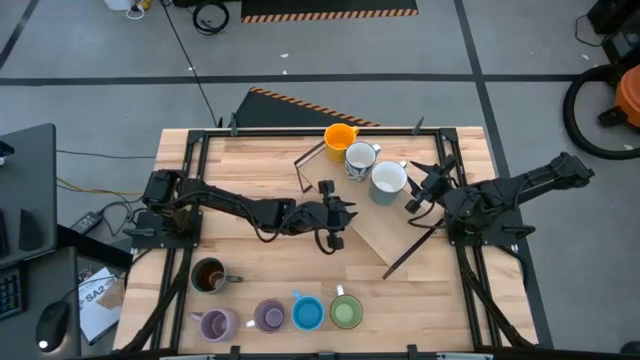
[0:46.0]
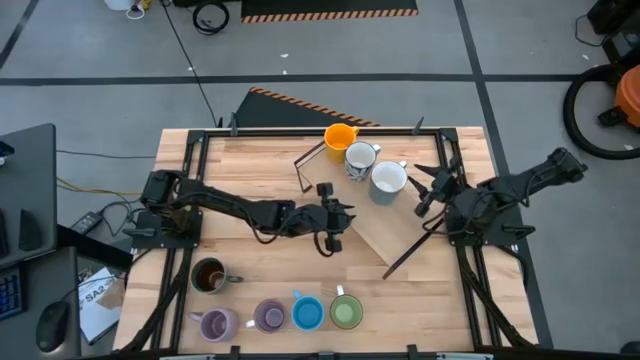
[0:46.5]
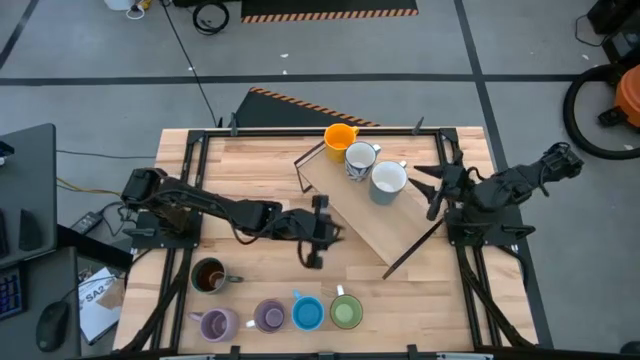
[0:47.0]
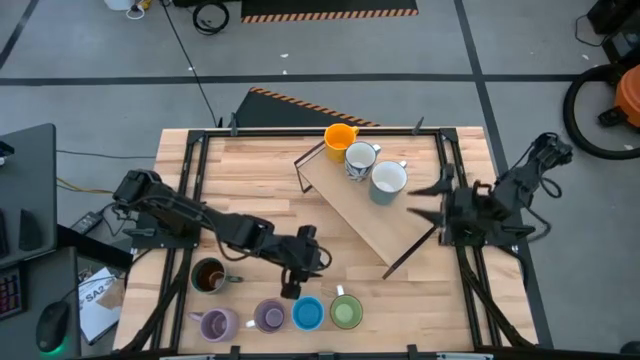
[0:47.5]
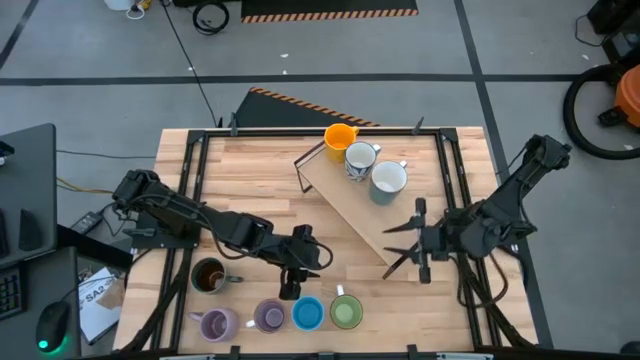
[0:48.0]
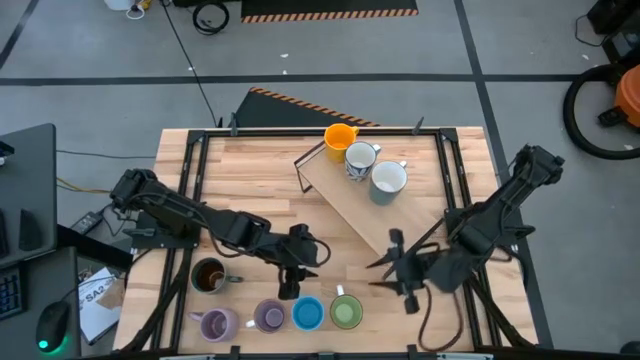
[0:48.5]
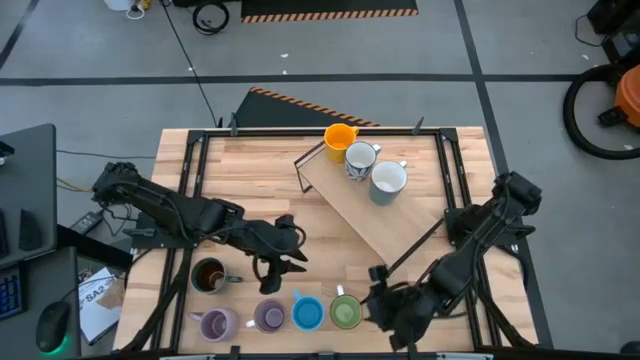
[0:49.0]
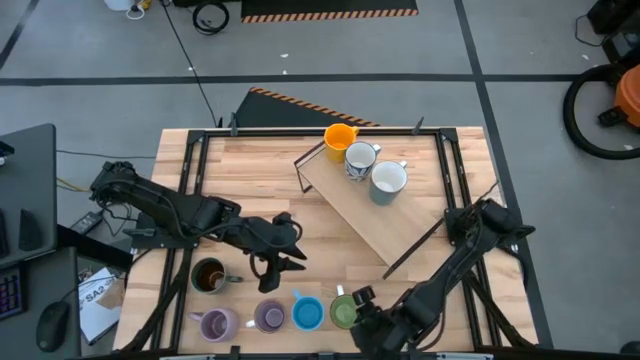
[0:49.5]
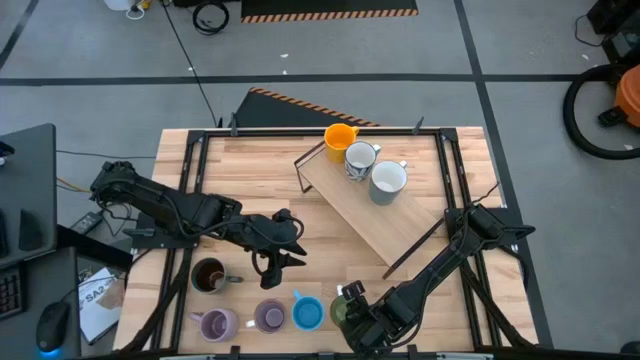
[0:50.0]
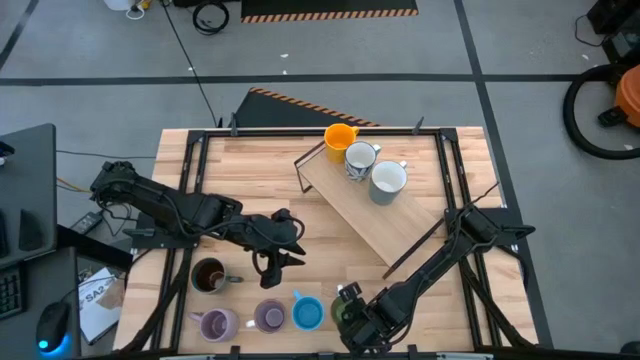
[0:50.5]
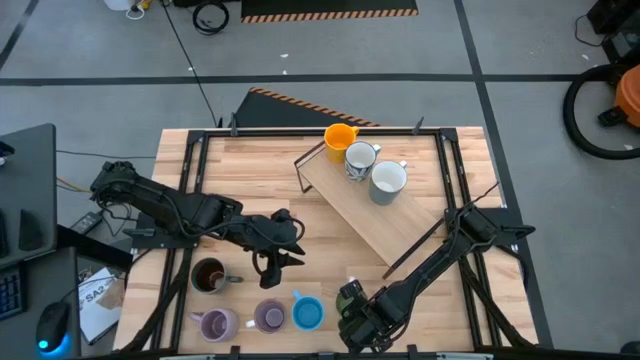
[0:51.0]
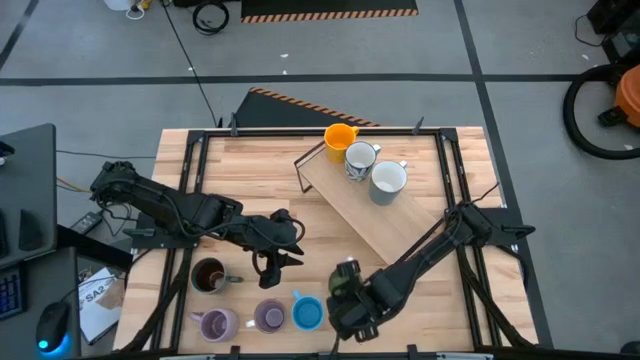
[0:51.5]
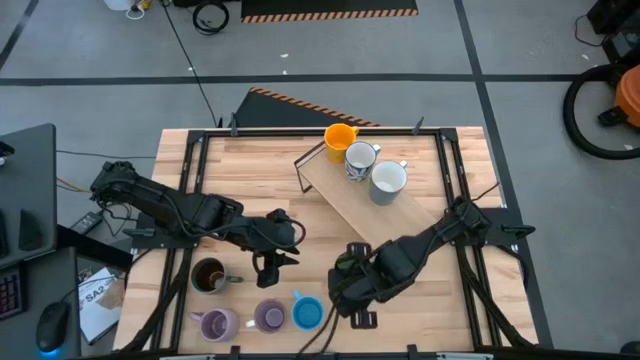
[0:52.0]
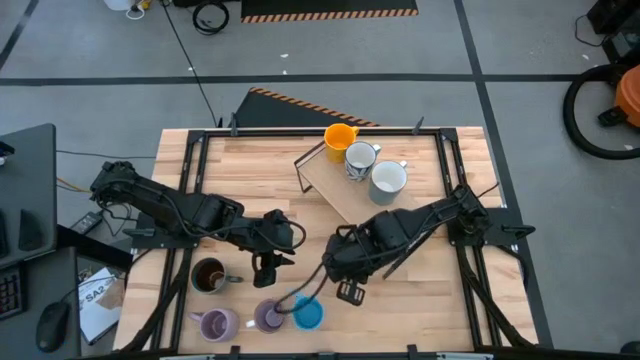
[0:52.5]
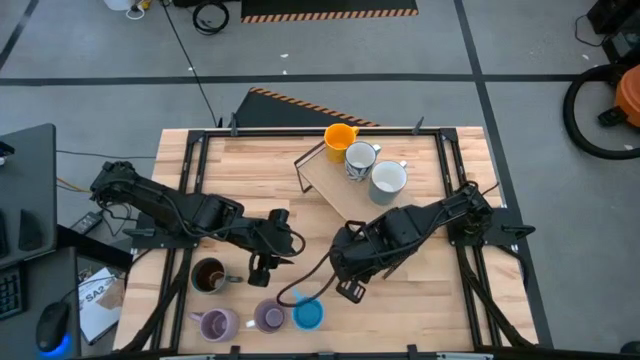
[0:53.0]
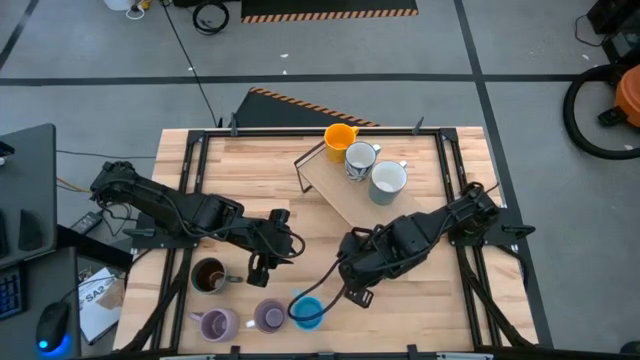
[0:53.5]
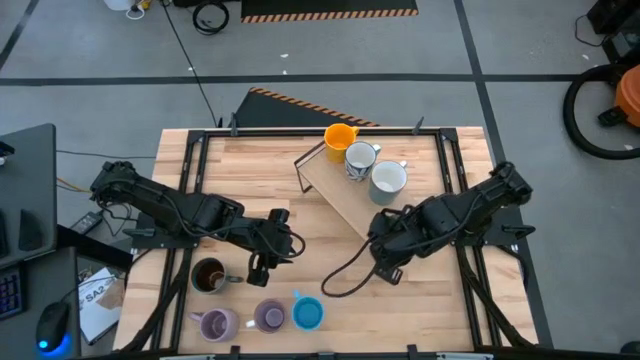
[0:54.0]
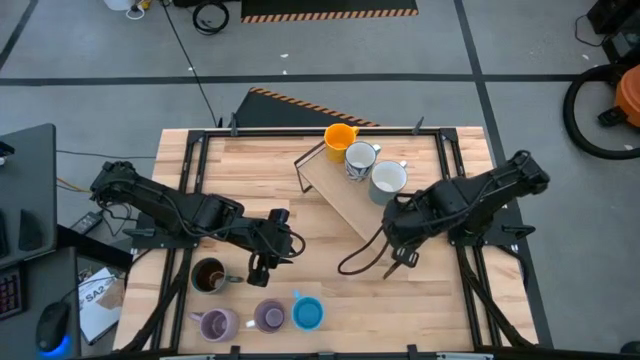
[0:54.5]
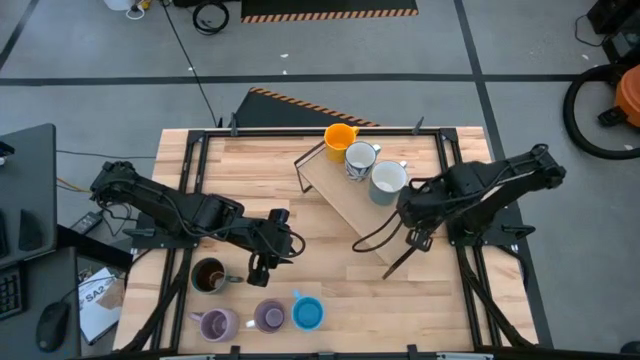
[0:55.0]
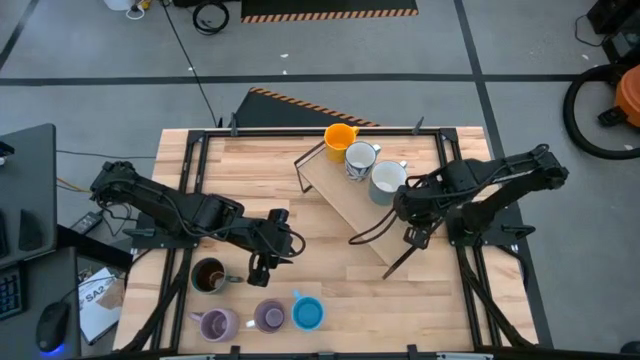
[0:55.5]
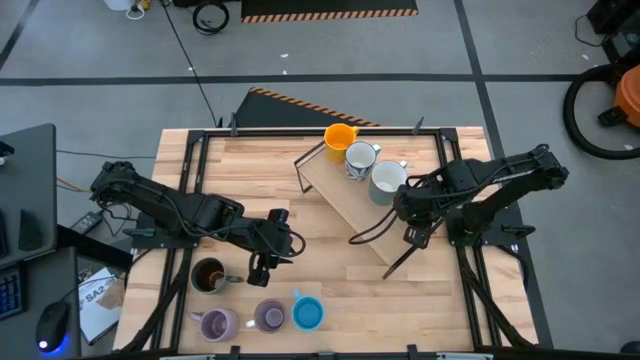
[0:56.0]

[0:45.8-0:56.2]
Task: Place coffee mugs
Put the green mug on the shelf

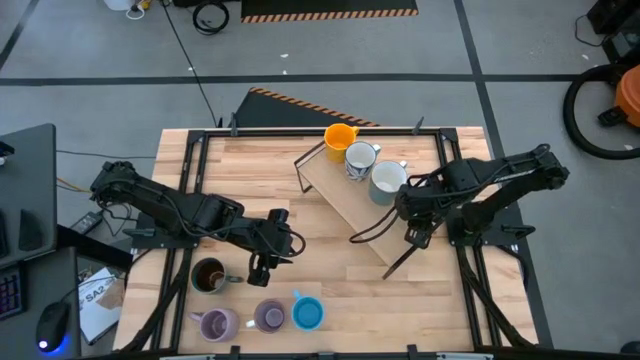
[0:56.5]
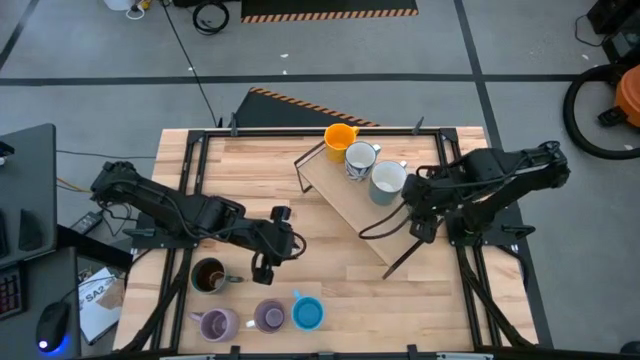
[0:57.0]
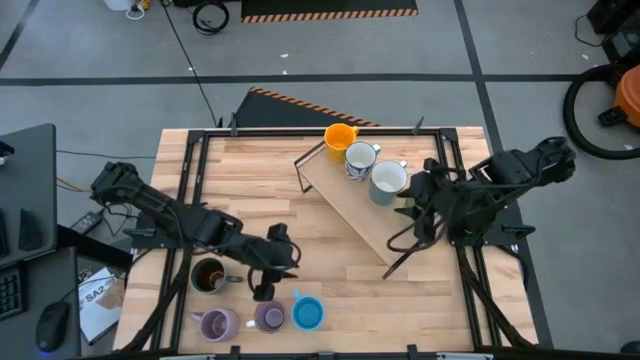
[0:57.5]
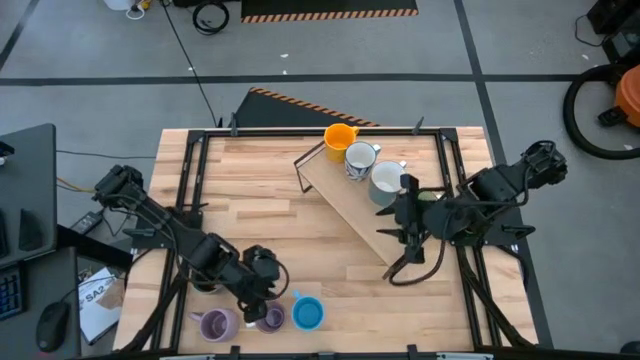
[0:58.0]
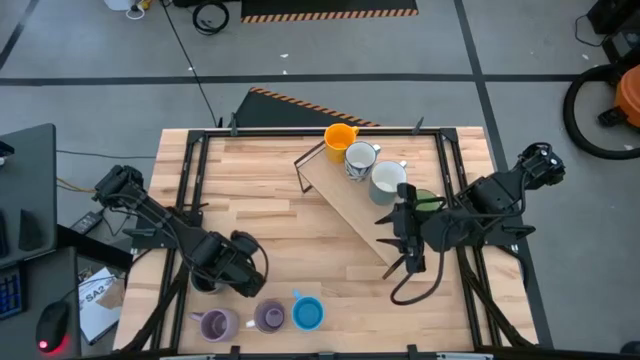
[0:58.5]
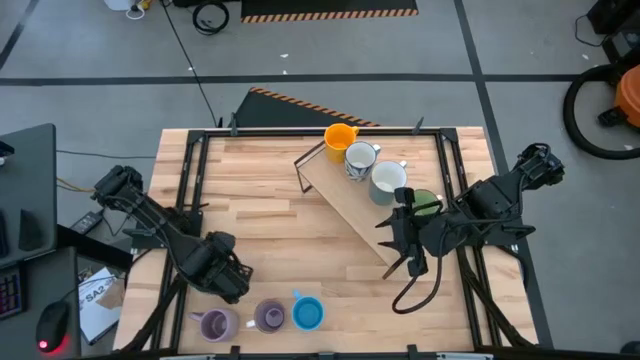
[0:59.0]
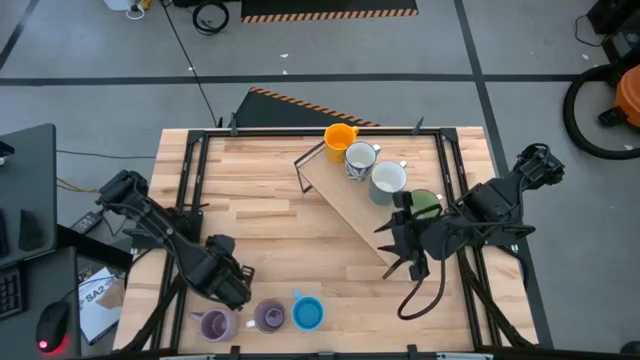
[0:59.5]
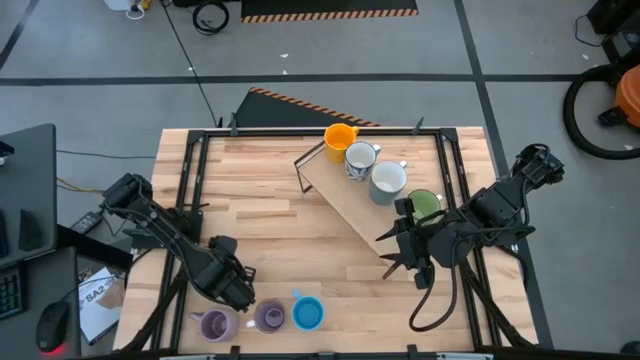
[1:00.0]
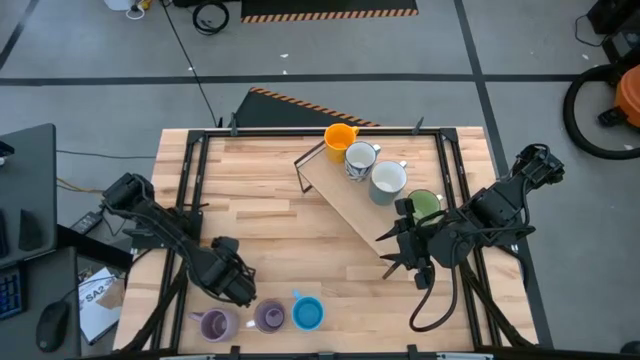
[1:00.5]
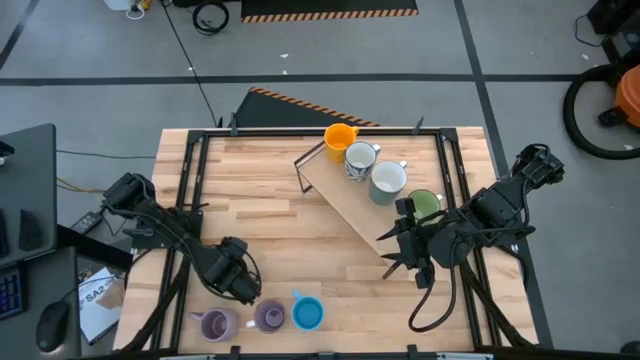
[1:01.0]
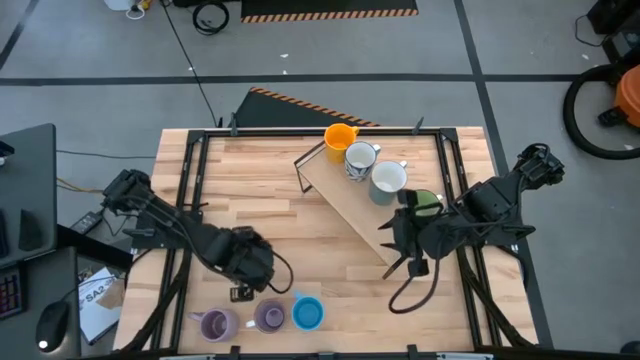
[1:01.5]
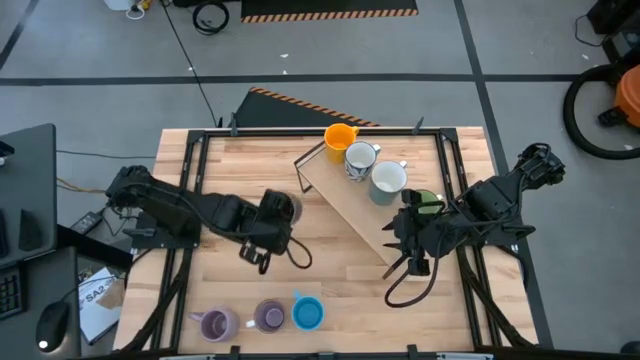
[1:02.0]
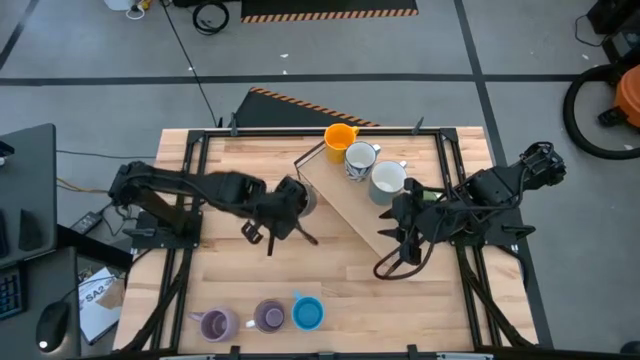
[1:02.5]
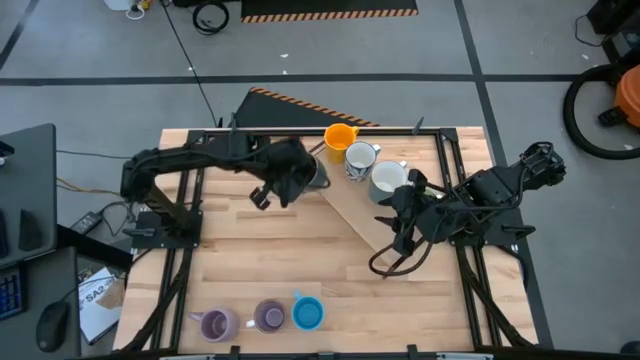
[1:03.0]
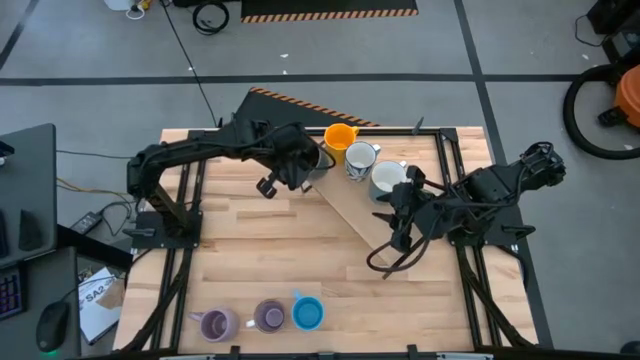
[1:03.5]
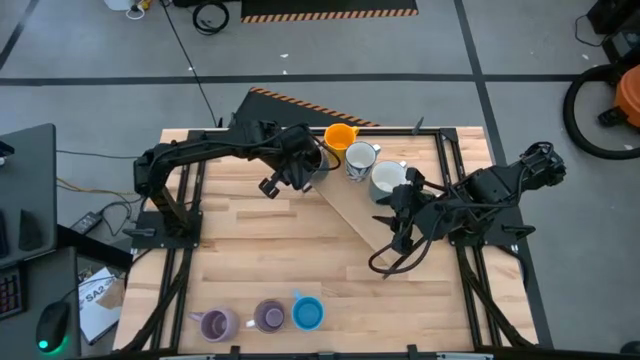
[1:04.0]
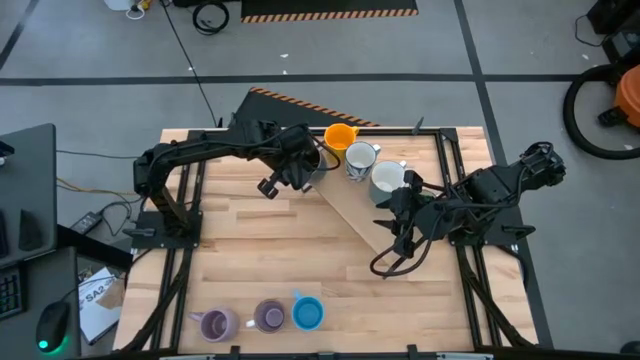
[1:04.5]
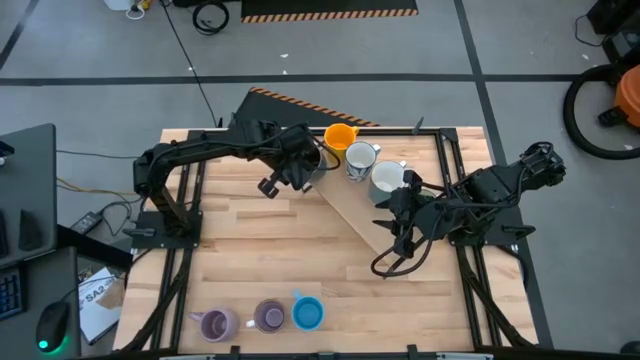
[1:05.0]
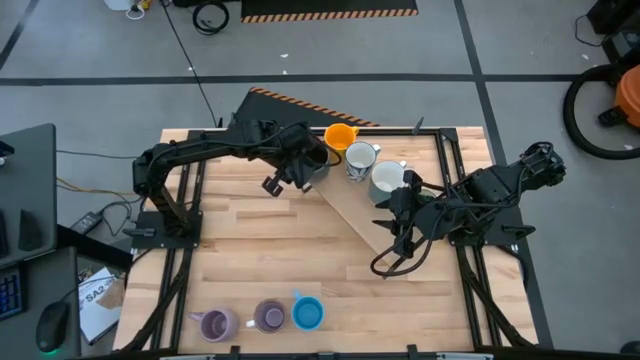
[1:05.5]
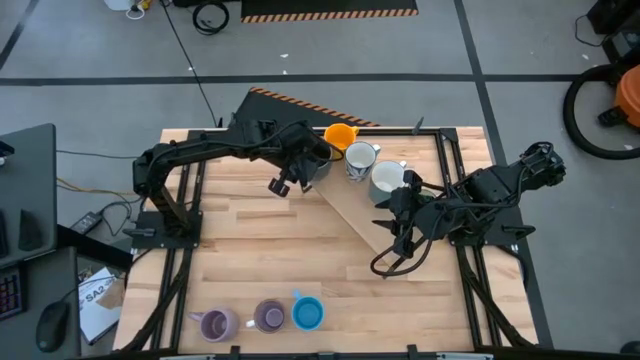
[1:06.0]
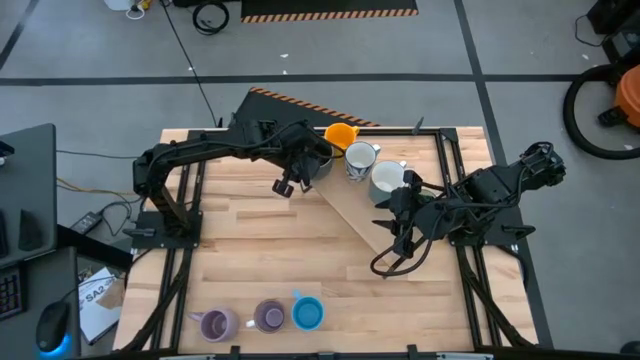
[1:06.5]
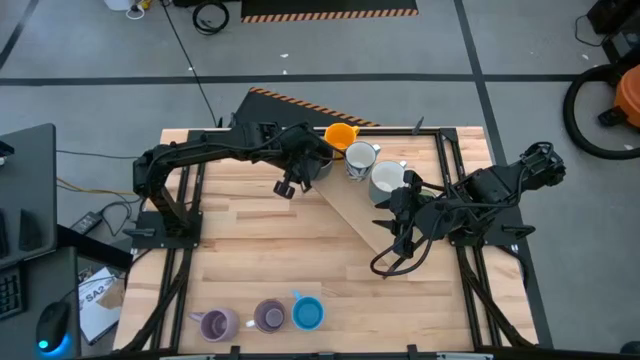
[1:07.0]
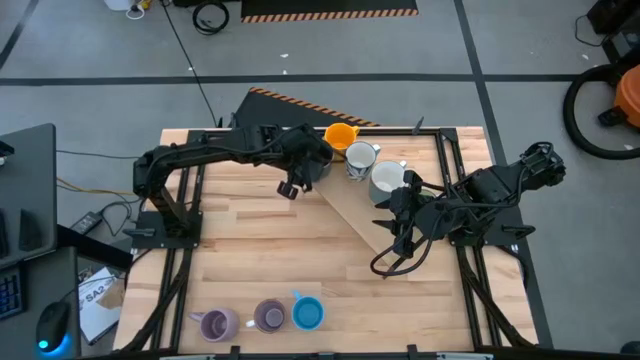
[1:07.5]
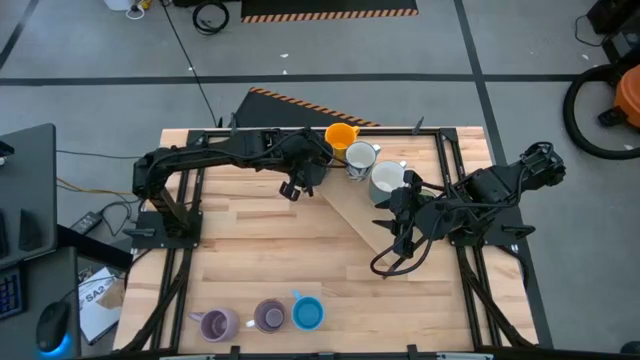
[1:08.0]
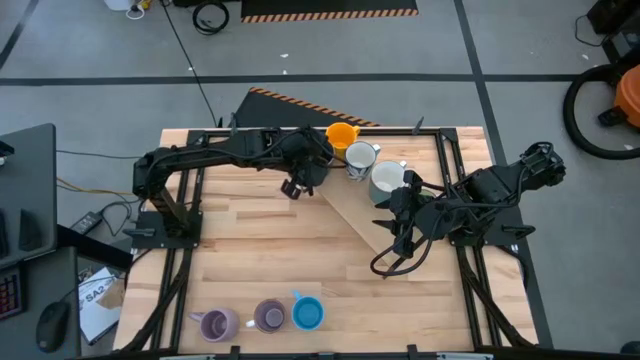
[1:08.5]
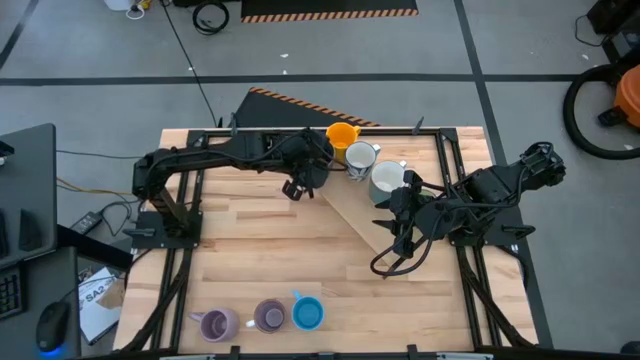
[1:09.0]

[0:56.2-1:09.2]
Put the dark blue patterned mug on the shelf
